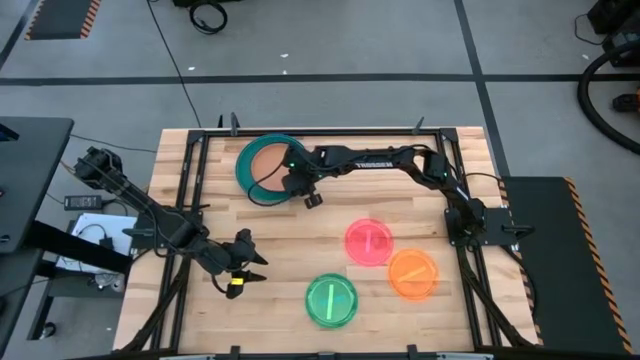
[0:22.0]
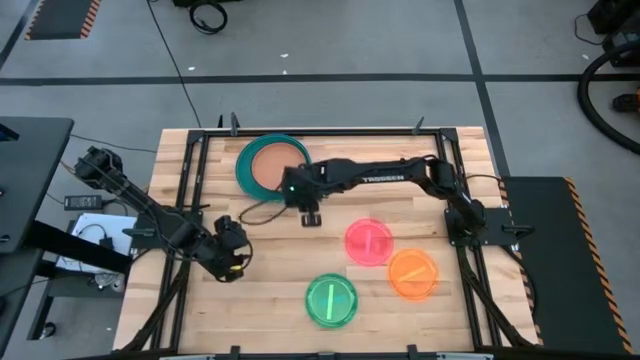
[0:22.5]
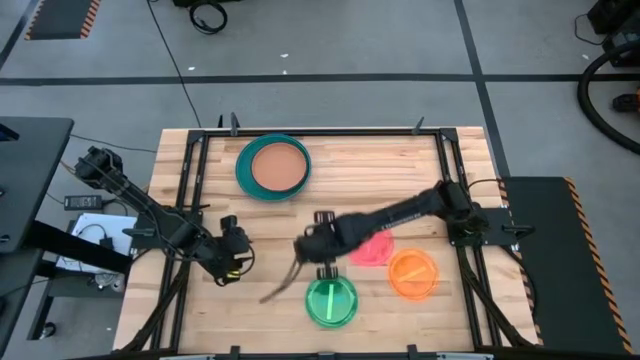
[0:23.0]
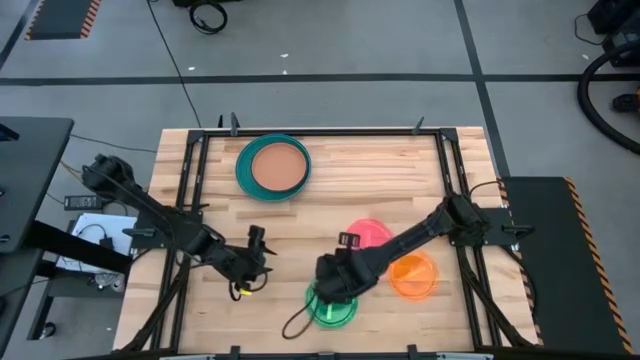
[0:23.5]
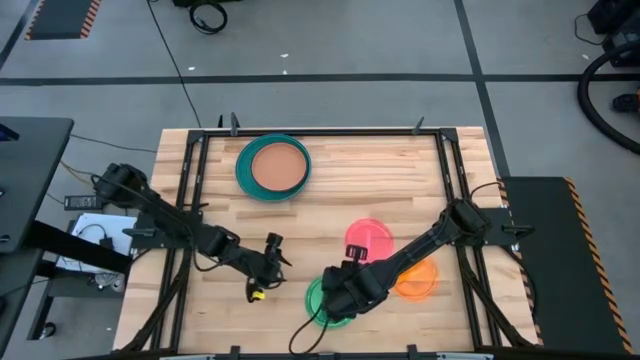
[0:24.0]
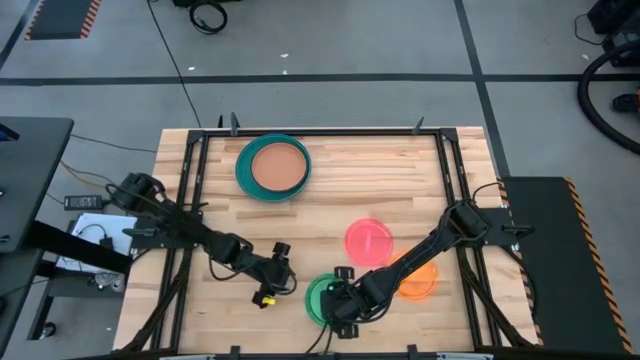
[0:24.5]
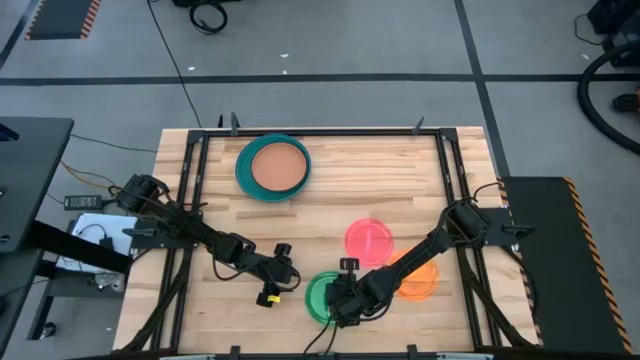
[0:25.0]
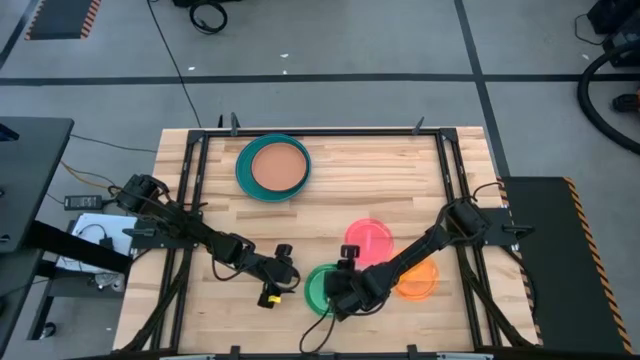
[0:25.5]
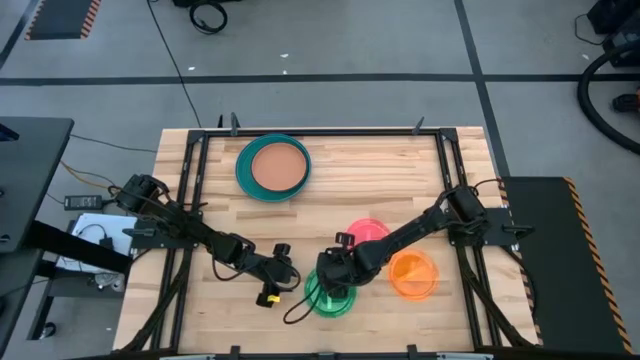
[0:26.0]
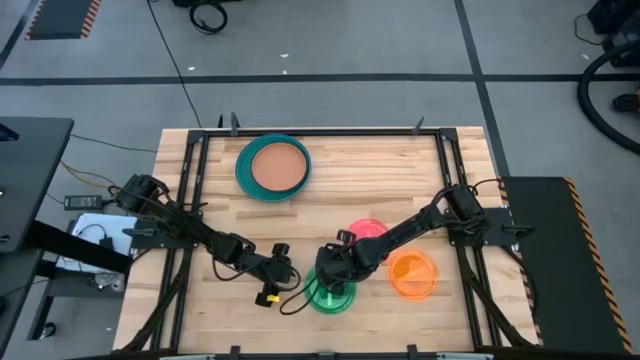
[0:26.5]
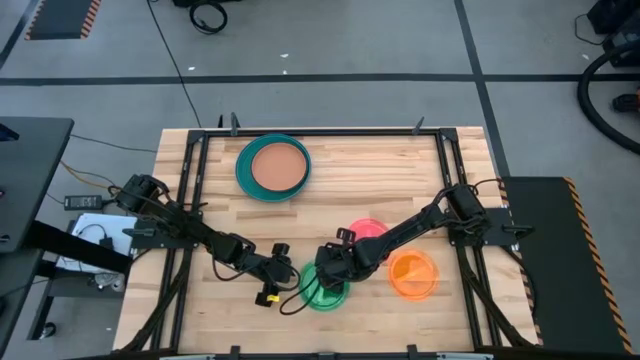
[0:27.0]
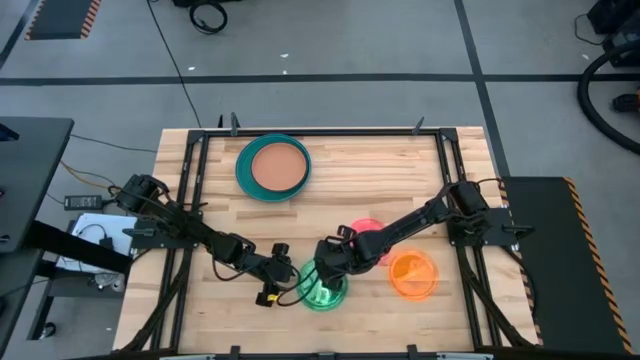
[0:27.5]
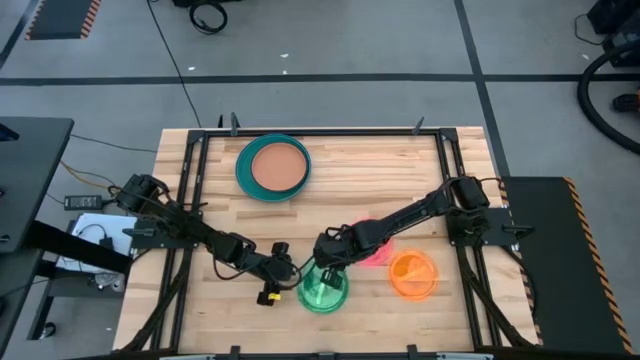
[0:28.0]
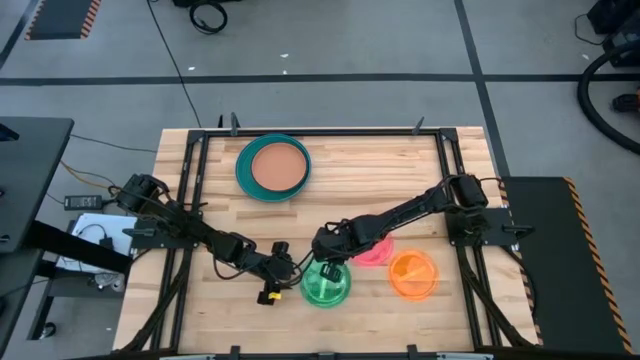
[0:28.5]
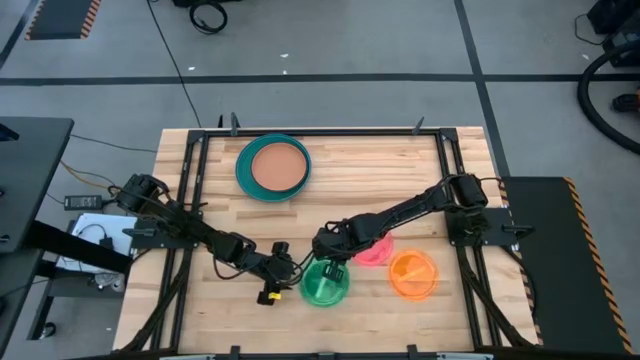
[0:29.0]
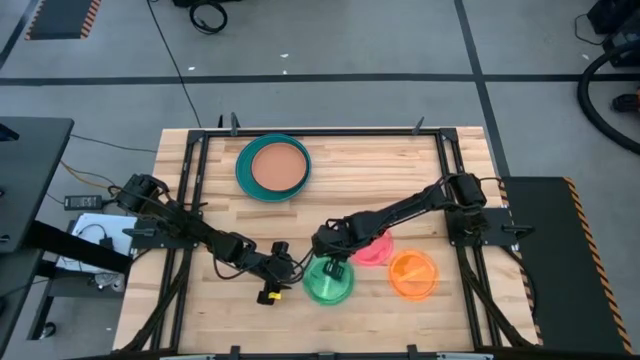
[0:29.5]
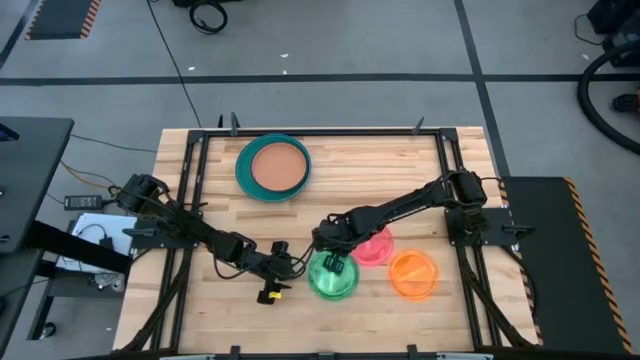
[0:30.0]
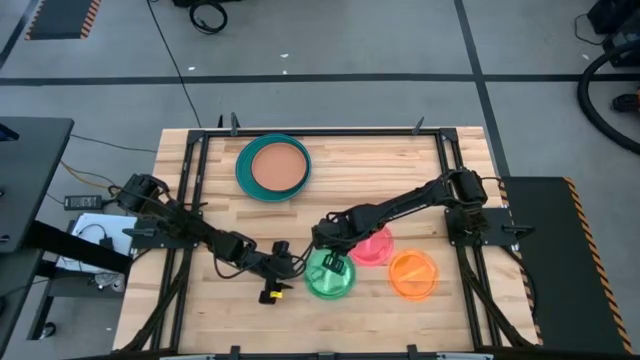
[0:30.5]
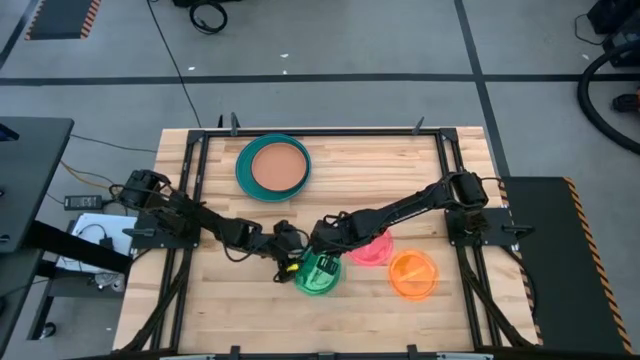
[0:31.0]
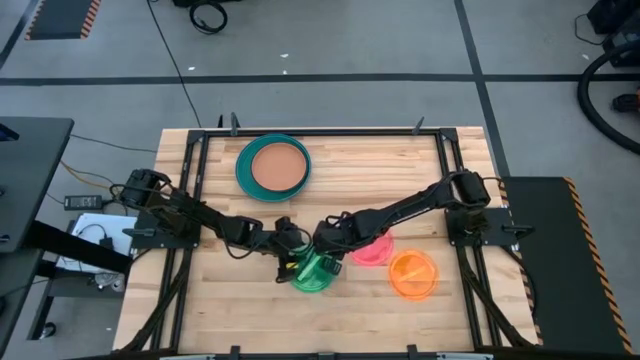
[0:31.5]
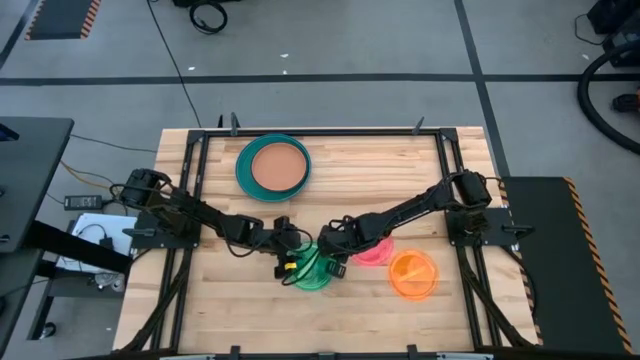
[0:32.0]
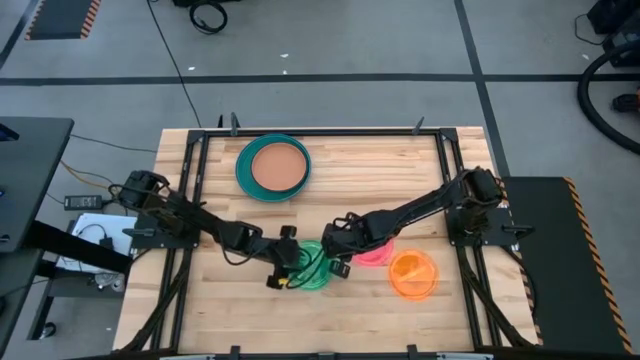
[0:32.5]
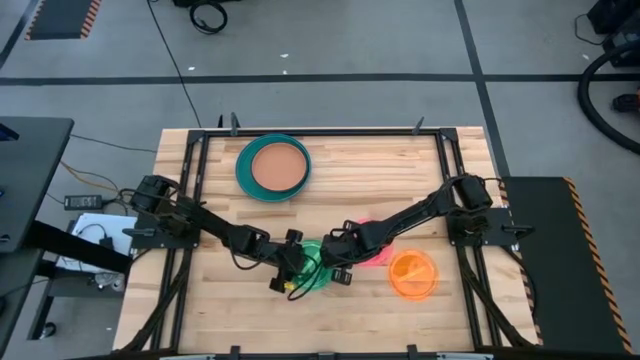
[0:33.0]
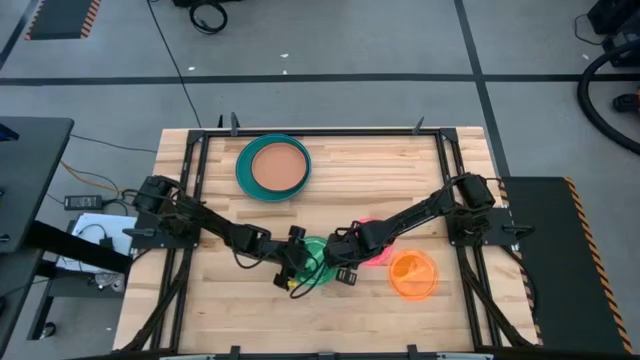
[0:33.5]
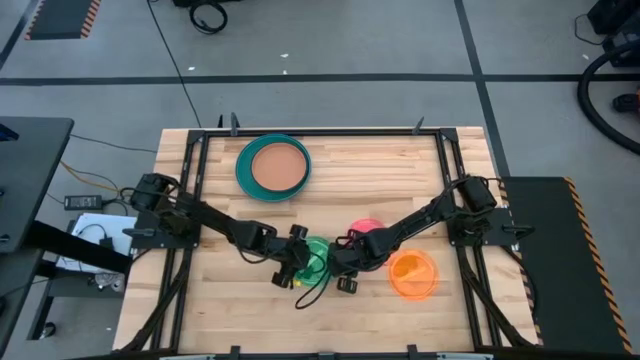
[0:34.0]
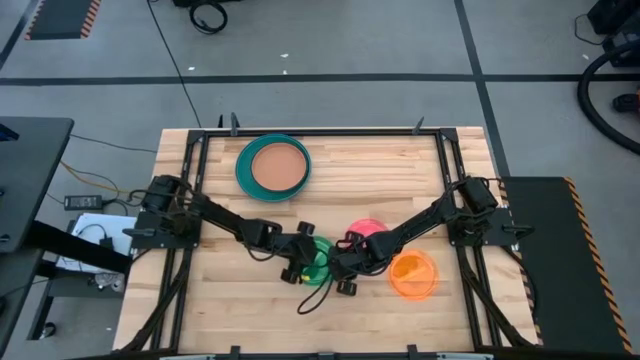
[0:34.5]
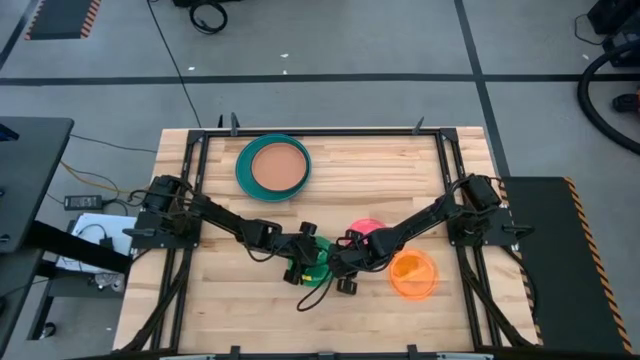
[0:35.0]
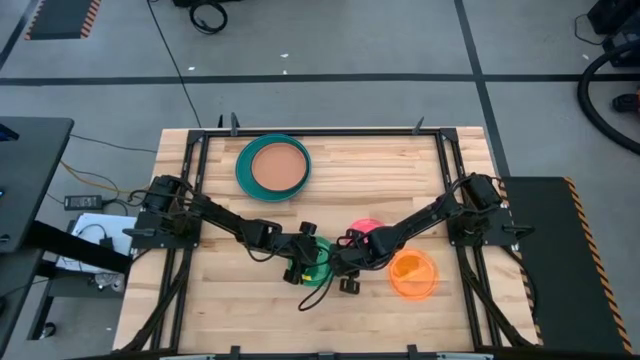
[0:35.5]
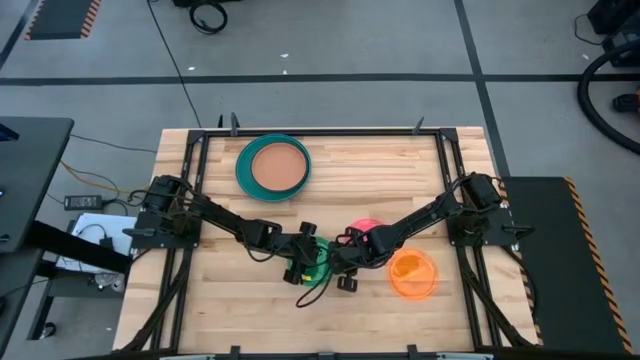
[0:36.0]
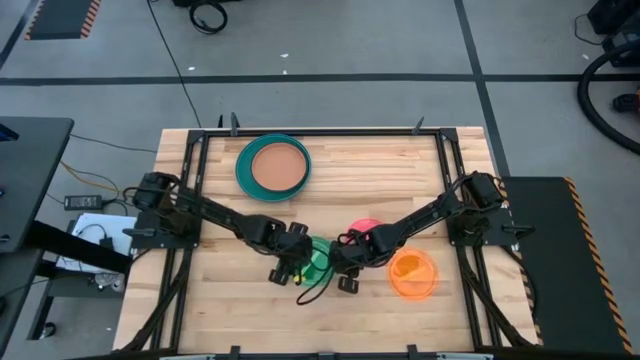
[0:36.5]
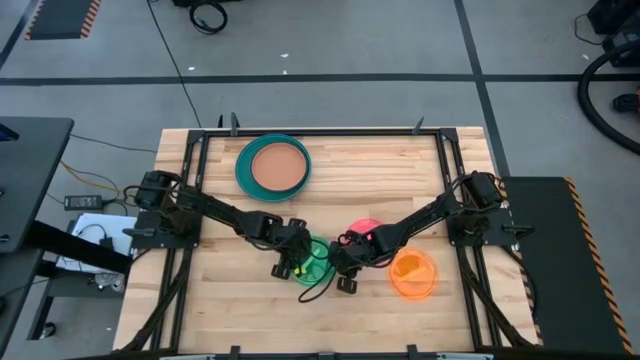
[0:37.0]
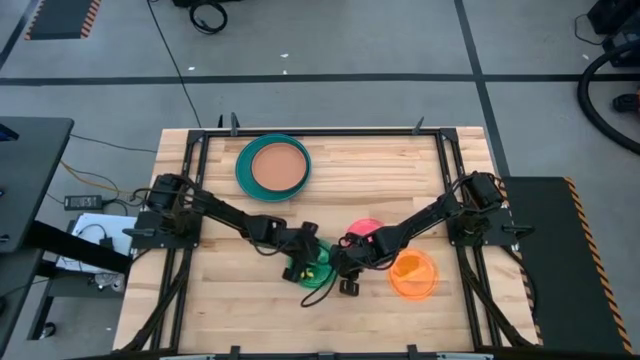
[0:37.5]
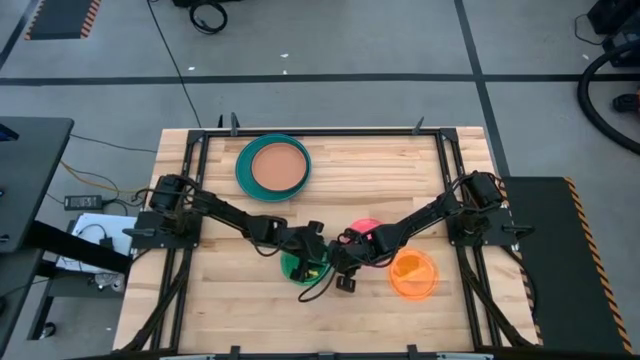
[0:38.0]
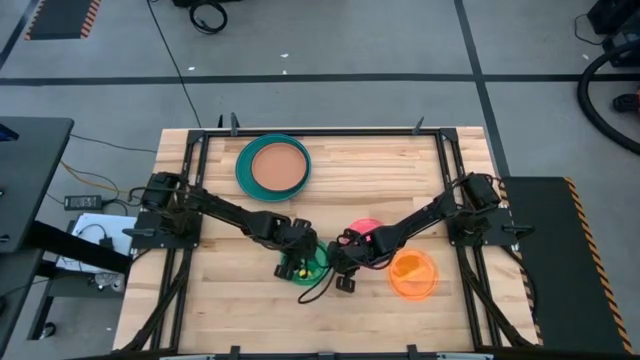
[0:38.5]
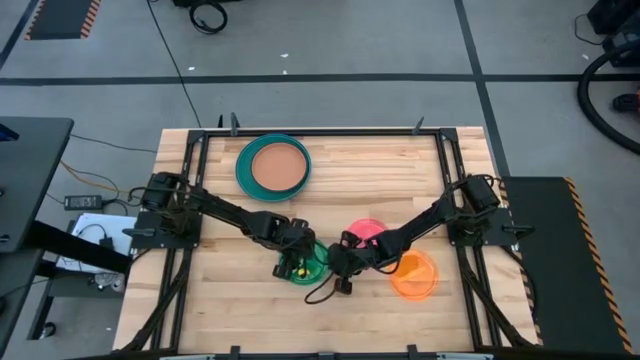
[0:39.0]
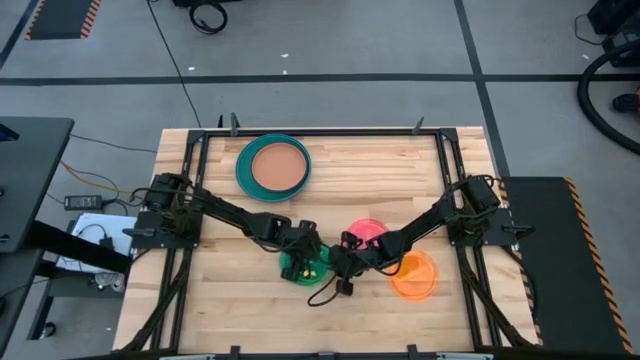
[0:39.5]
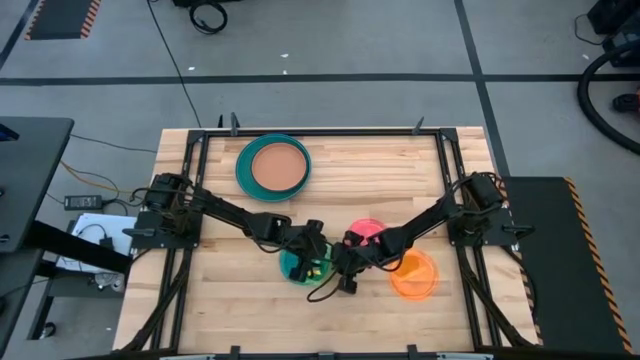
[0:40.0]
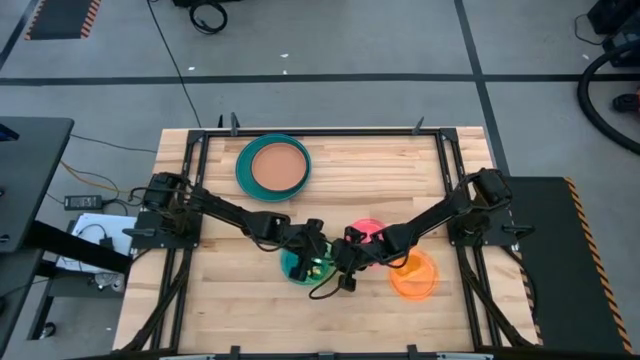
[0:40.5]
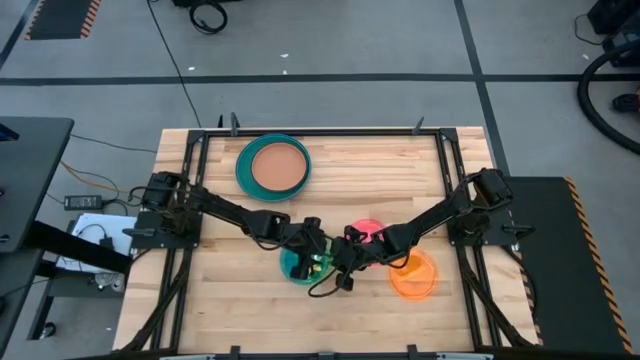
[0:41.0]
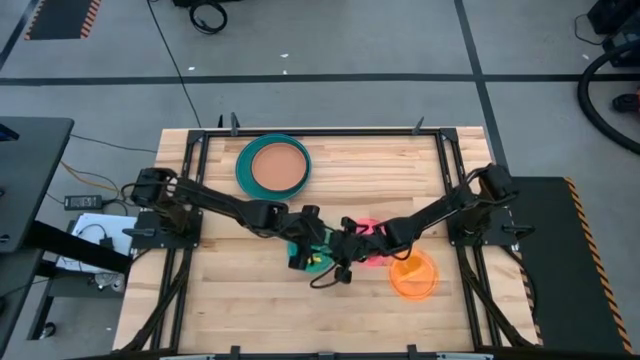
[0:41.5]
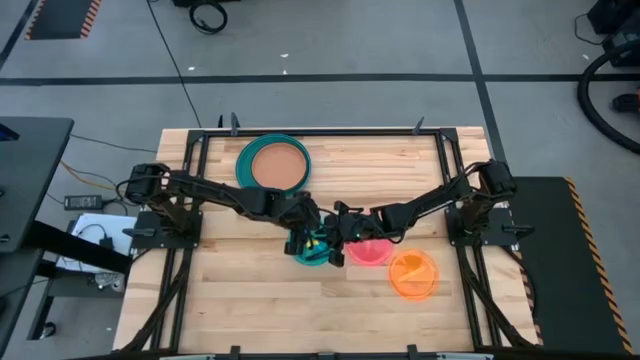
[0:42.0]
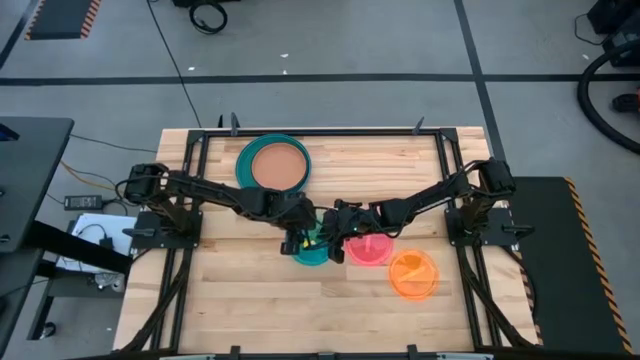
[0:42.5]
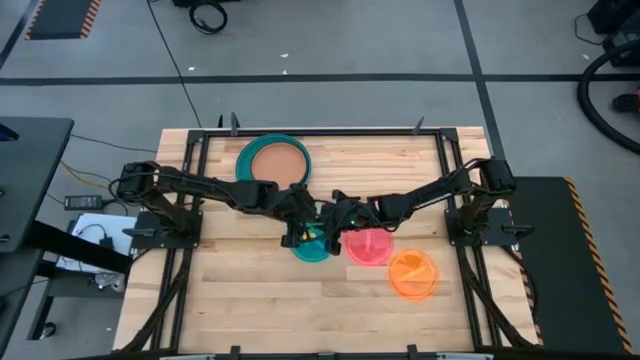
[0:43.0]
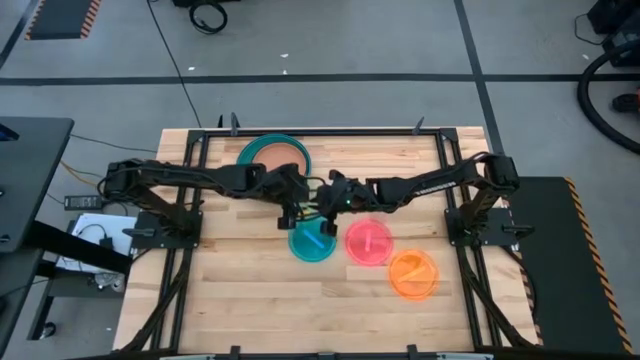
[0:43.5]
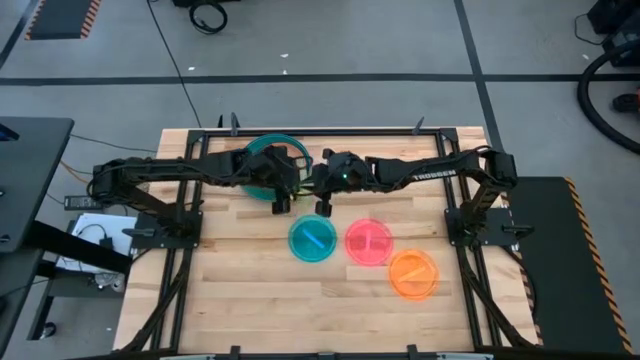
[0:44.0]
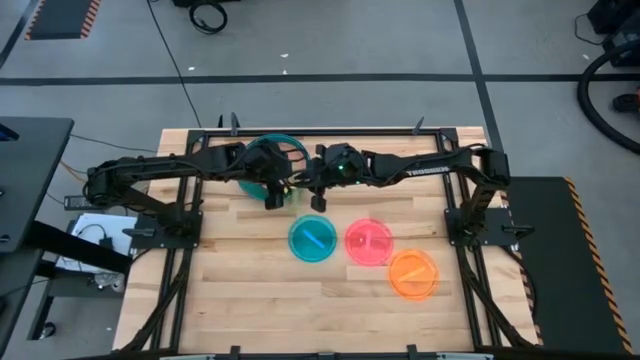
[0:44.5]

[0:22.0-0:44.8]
Task: Stack plastic plates
Stack the light green plate on top of the brown plate
